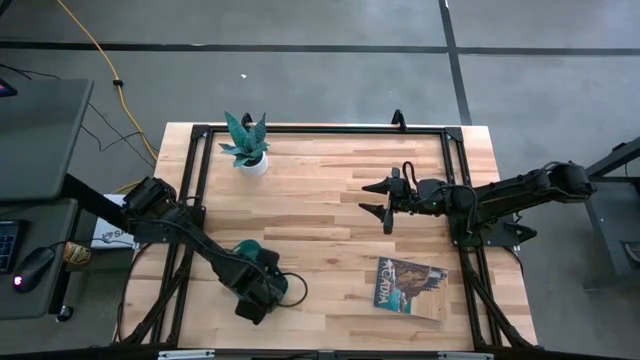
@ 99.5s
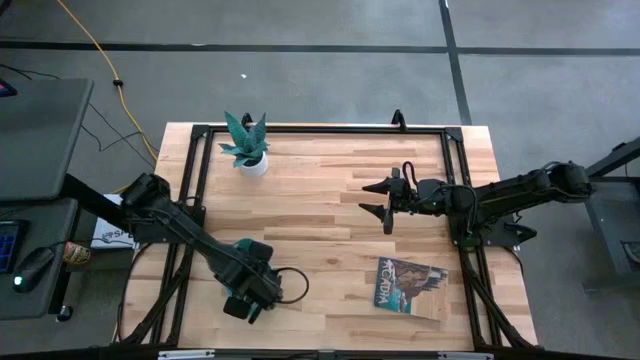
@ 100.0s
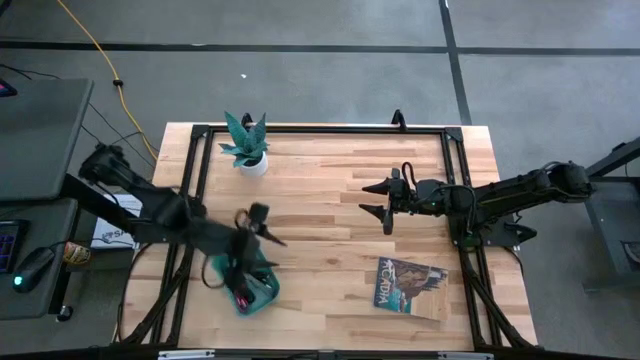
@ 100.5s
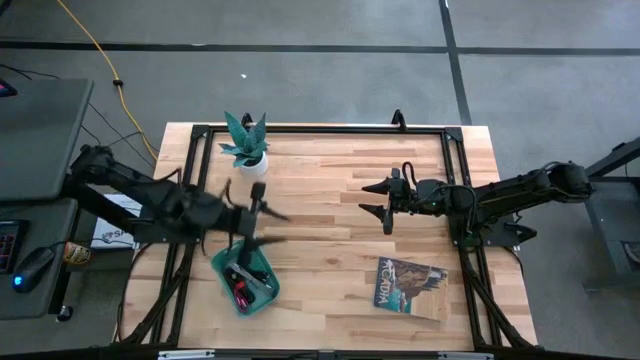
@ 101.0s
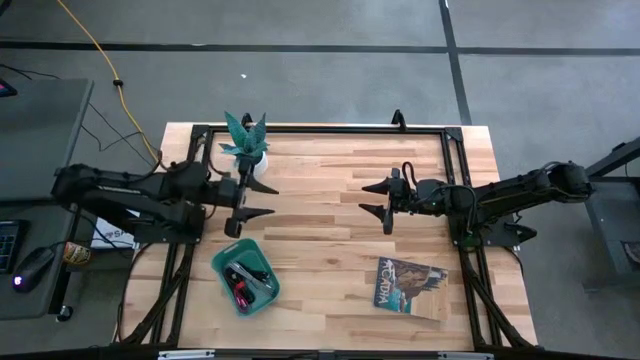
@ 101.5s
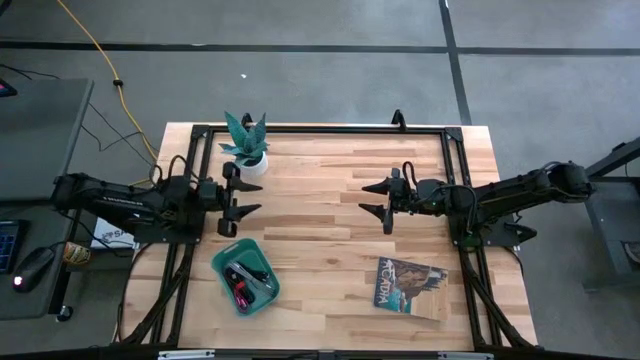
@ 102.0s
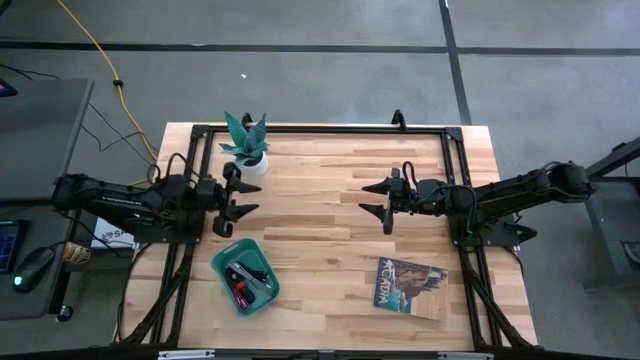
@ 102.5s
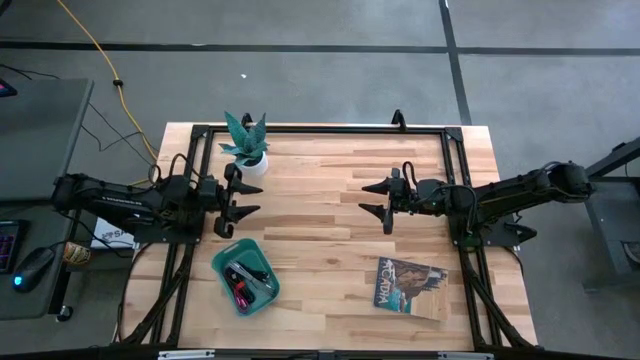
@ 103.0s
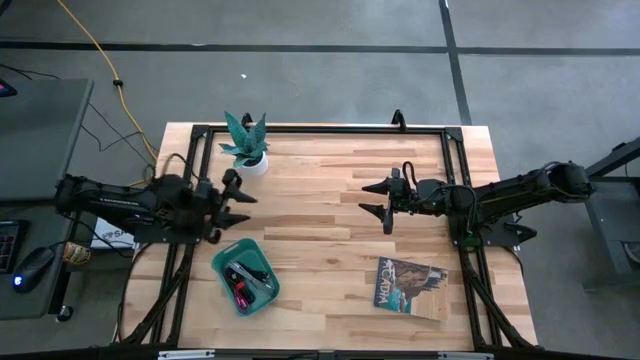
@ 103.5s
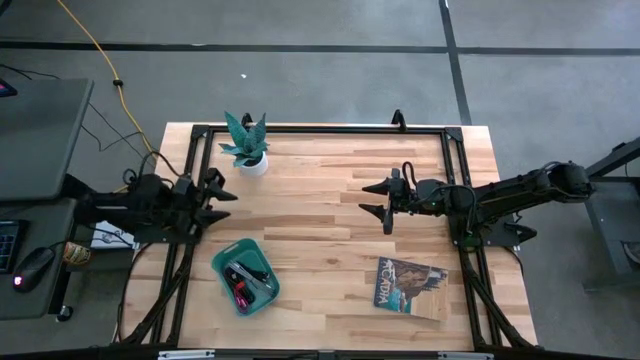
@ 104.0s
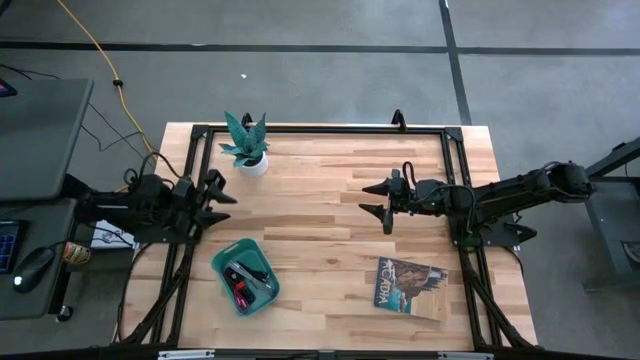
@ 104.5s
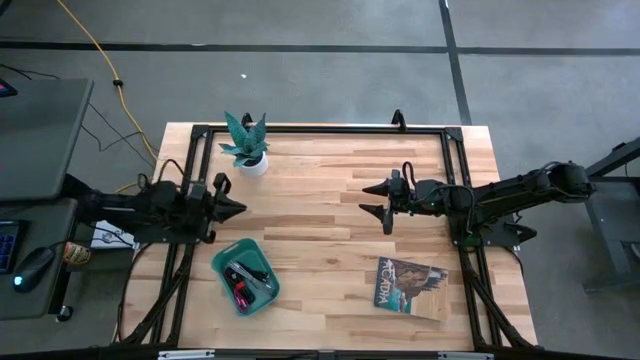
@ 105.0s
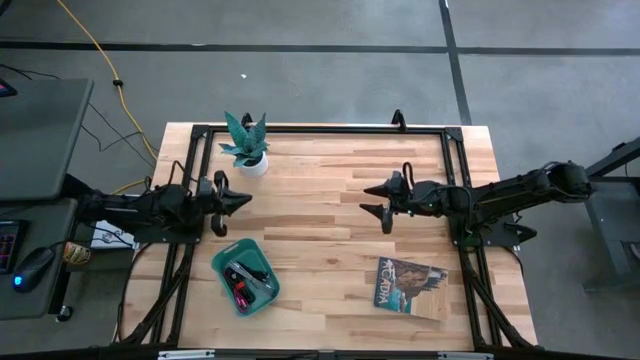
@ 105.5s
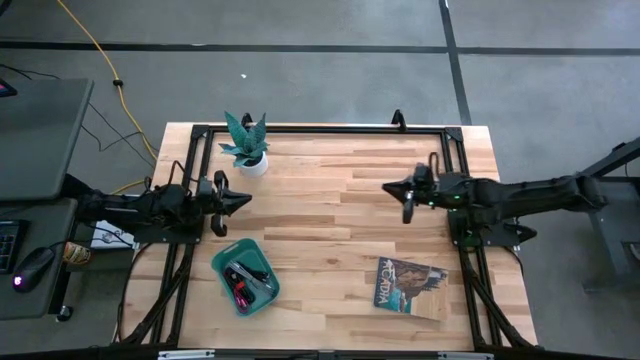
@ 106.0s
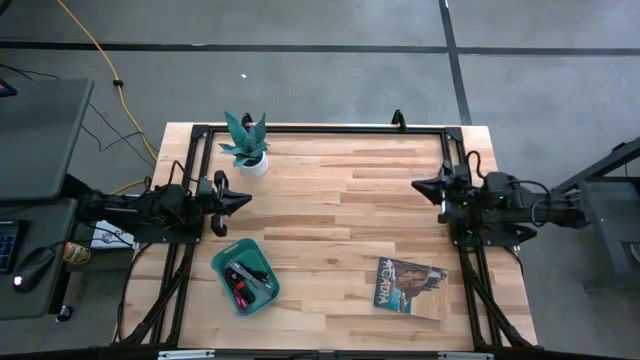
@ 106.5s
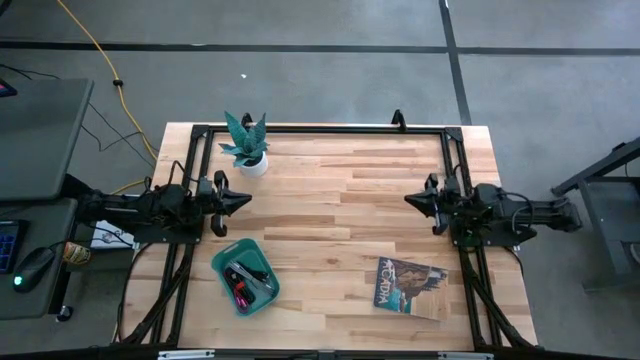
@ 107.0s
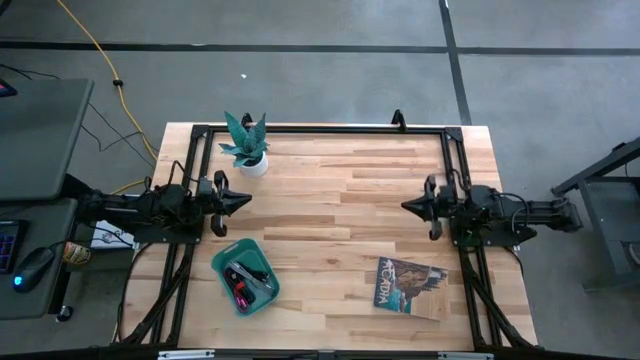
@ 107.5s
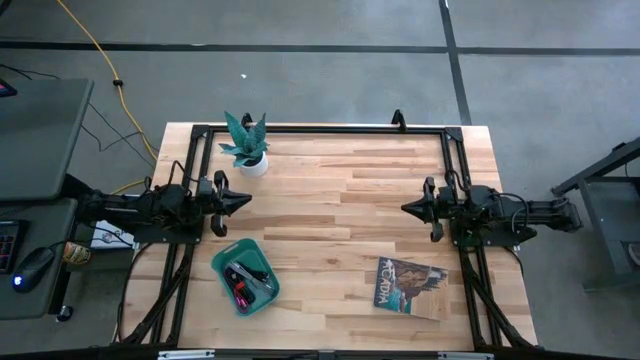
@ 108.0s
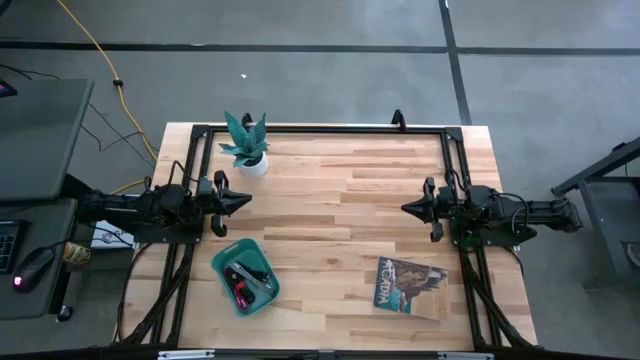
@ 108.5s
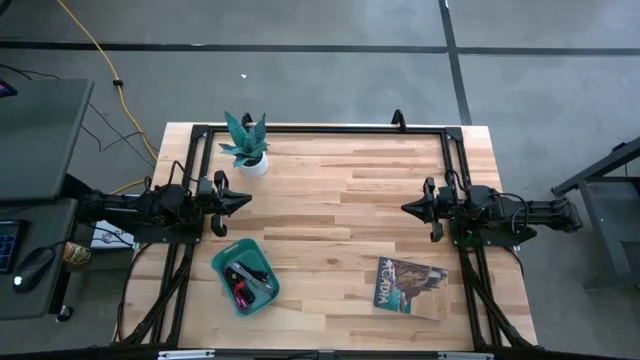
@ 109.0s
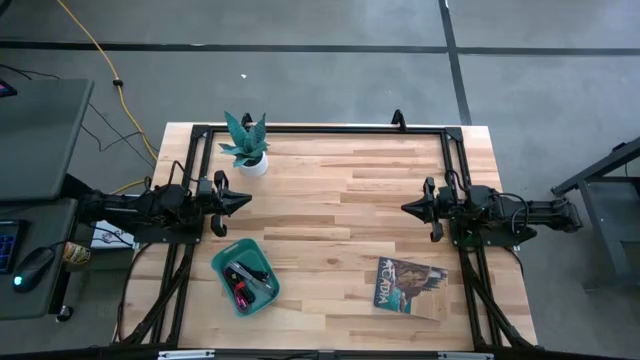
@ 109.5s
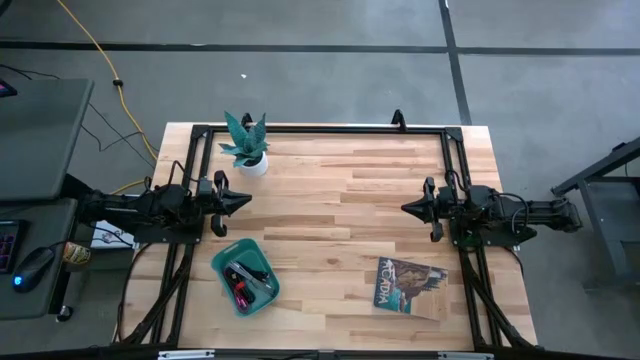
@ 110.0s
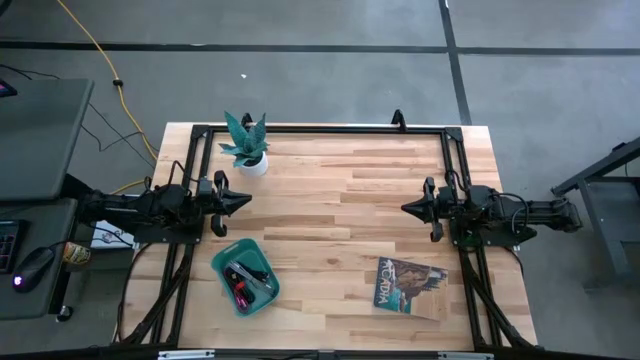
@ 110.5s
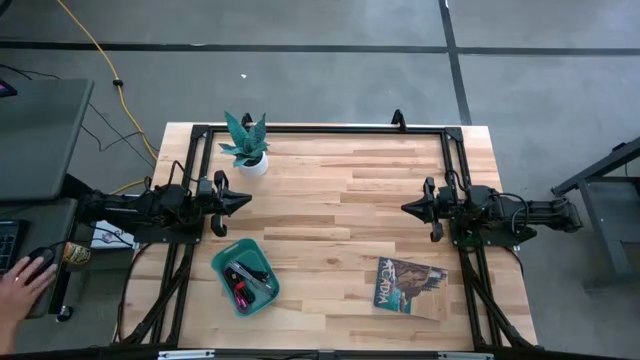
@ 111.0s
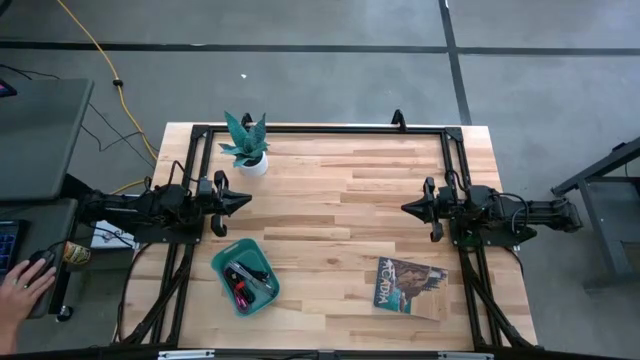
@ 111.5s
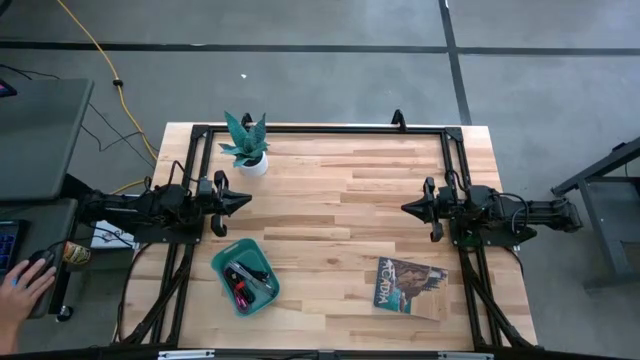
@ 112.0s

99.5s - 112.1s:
Task: Pick and place USB-C Cables
Return to Home Position

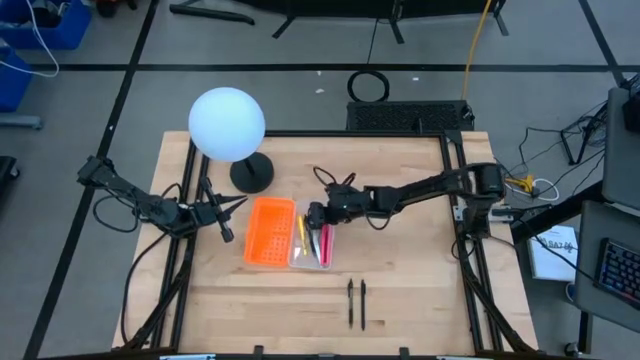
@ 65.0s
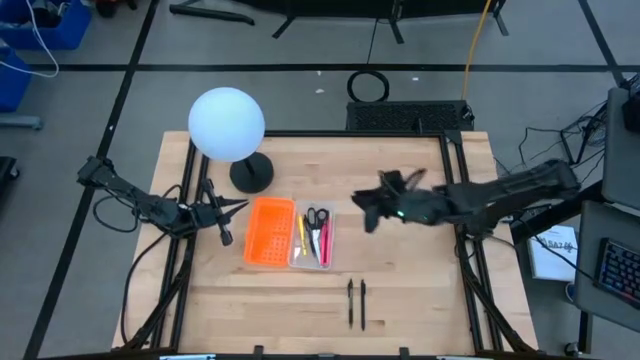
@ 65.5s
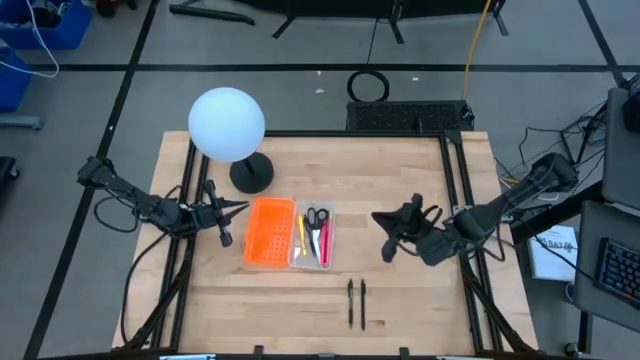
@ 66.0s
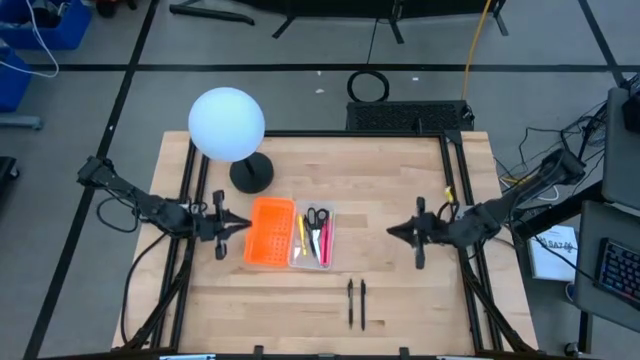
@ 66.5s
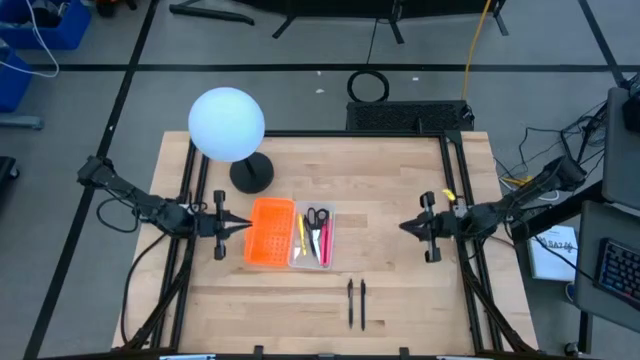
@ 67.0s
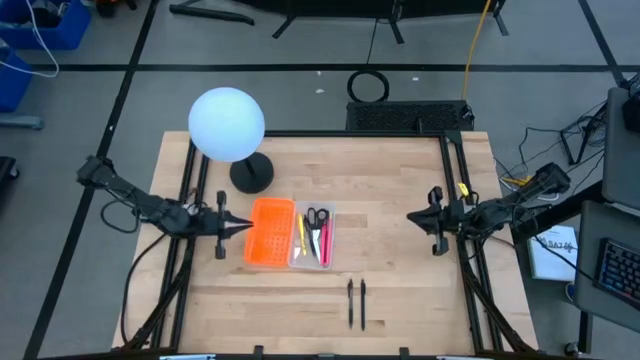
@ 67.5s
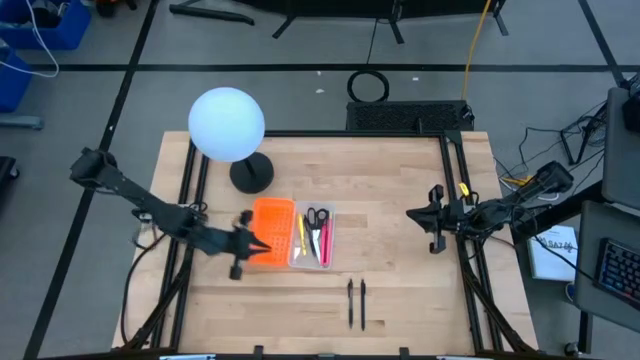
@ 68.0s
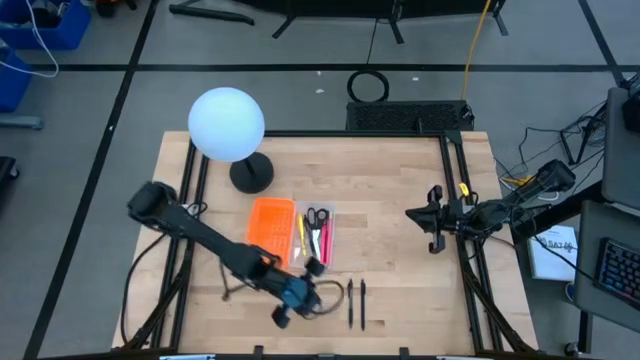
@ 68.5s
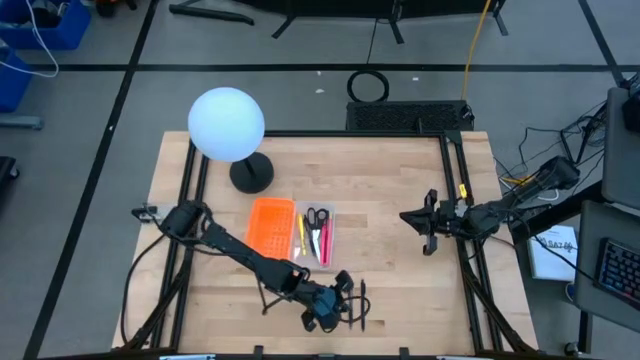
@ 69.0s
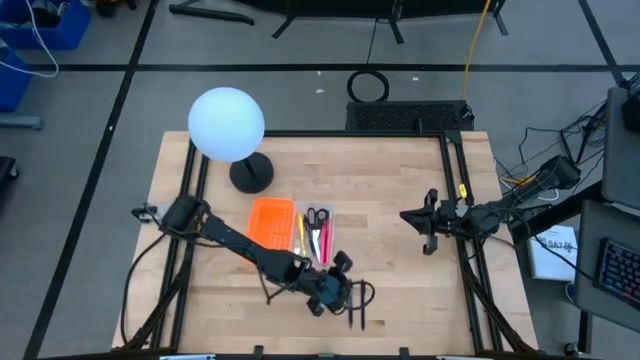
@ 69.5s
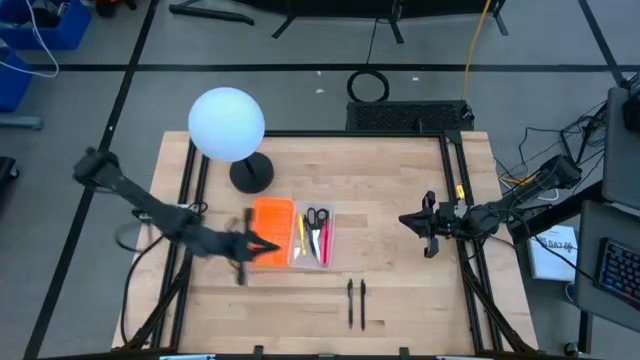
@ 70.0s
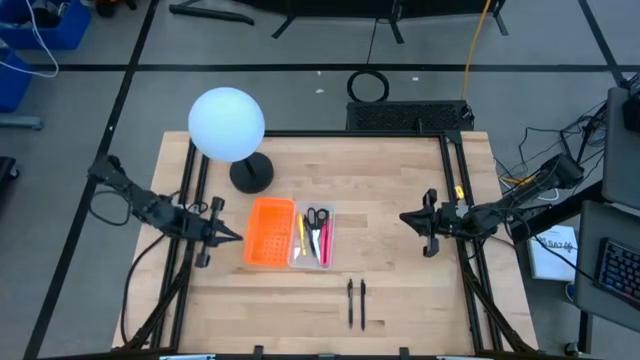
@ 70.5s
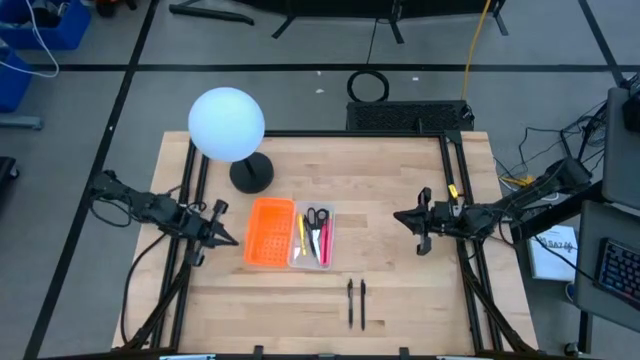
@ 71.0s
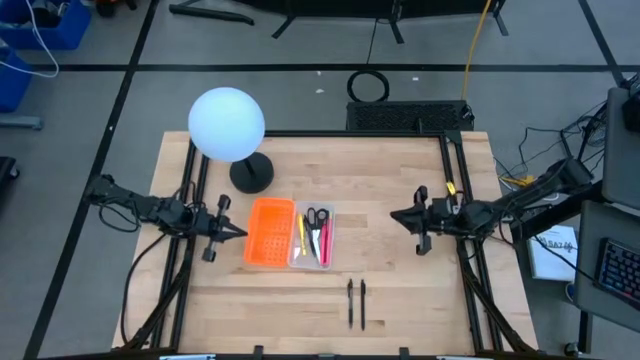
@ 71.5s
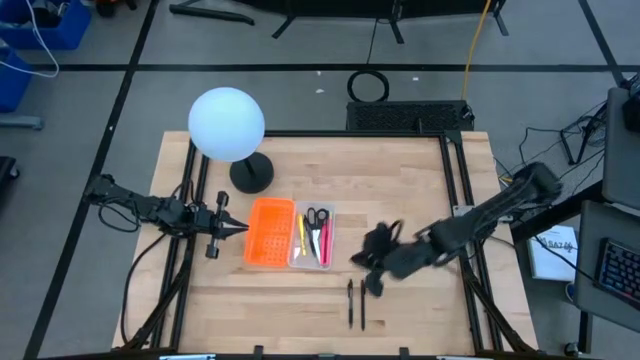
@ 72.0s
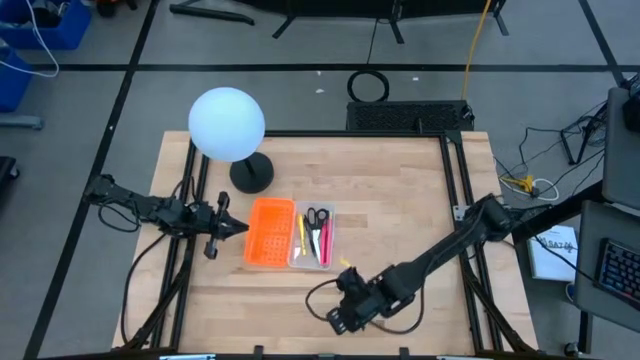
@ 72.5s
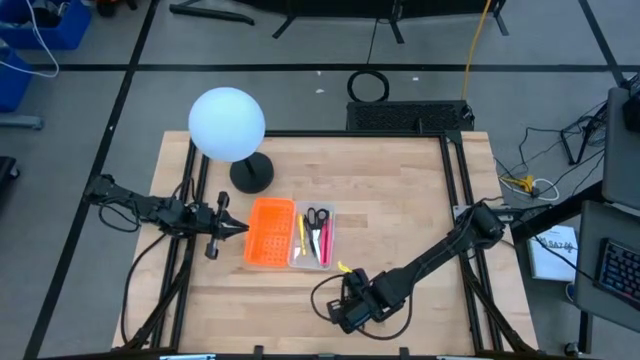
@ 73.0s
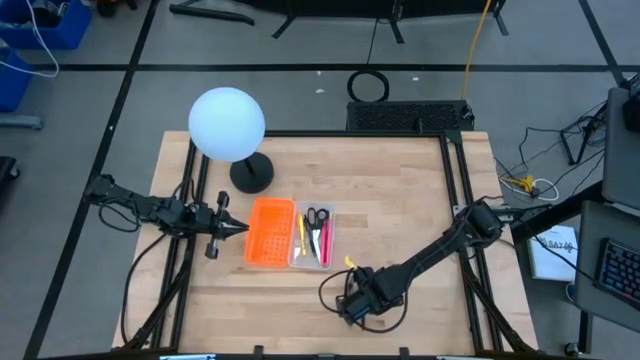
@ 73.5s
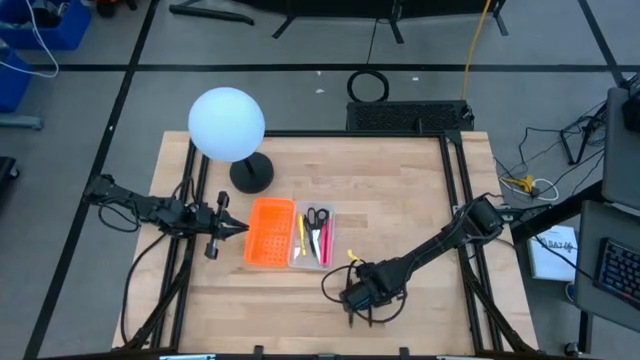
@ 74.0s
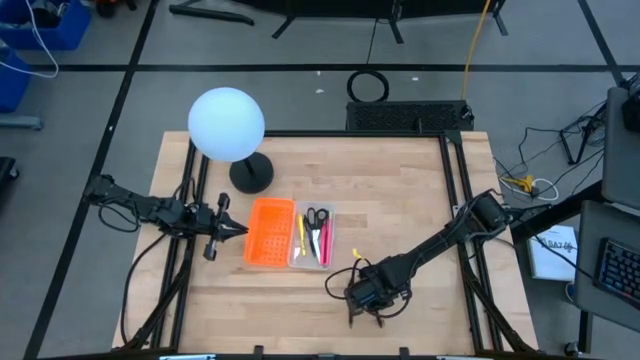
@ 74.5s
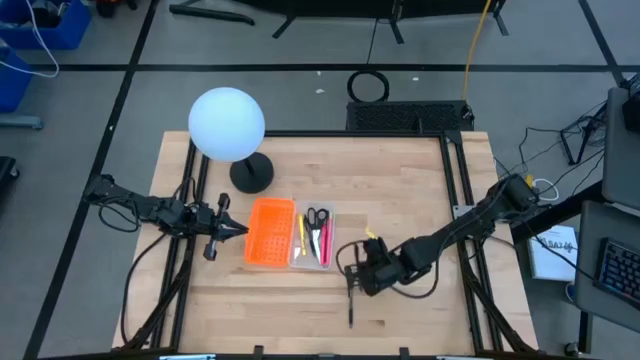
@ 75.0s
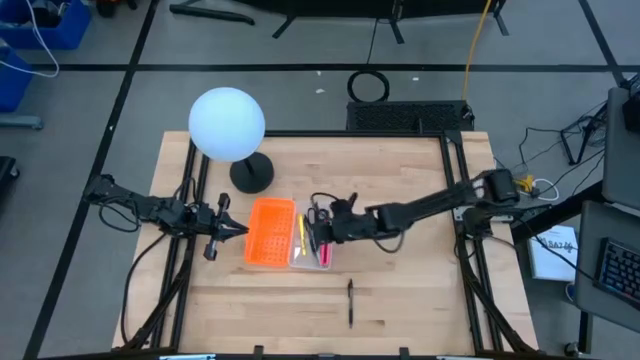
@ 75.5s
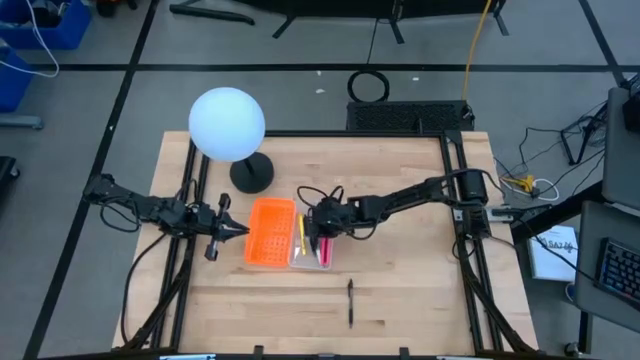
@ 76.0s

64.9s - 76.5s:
Task: Pick & place school supplies into a supply box
Put the right black pen into the supply box
